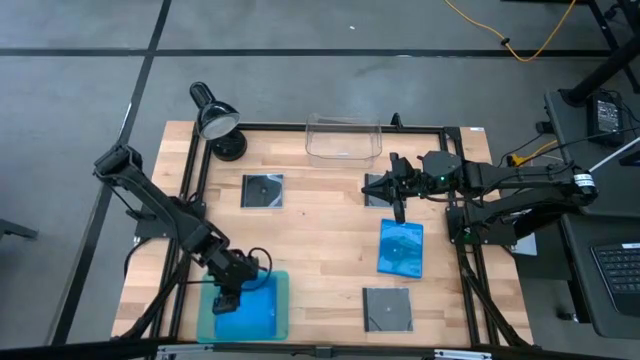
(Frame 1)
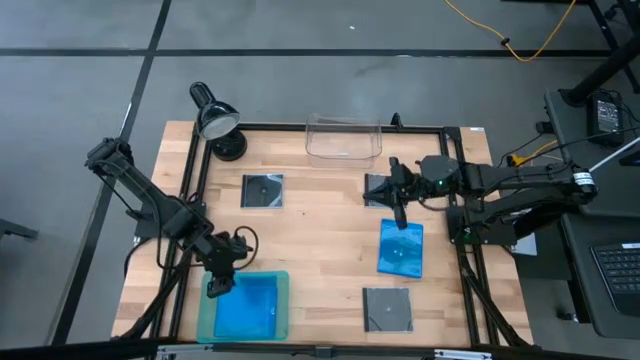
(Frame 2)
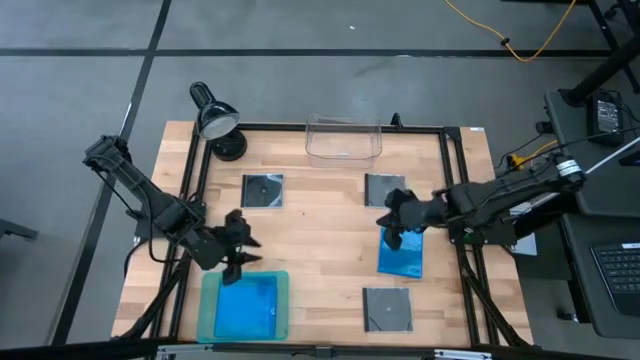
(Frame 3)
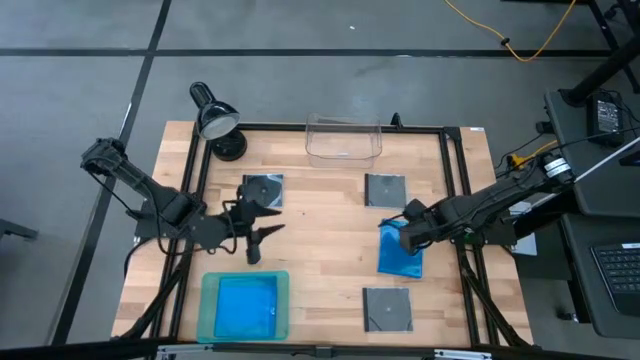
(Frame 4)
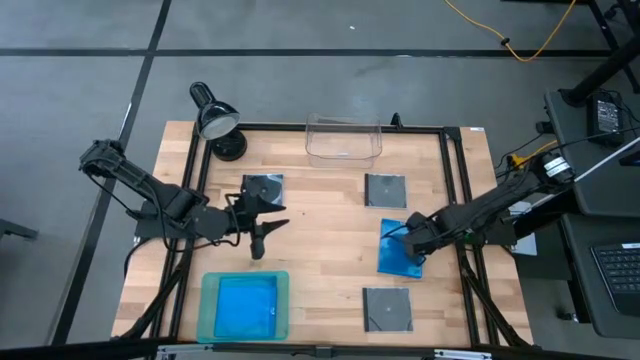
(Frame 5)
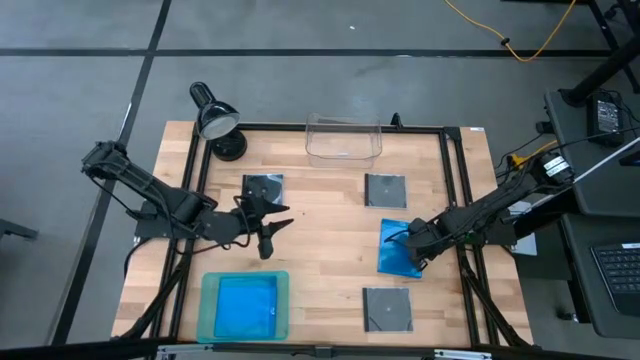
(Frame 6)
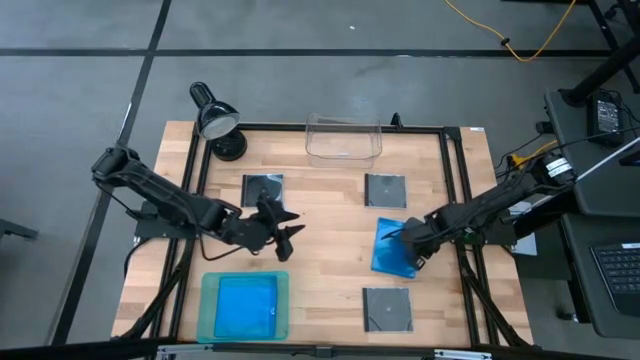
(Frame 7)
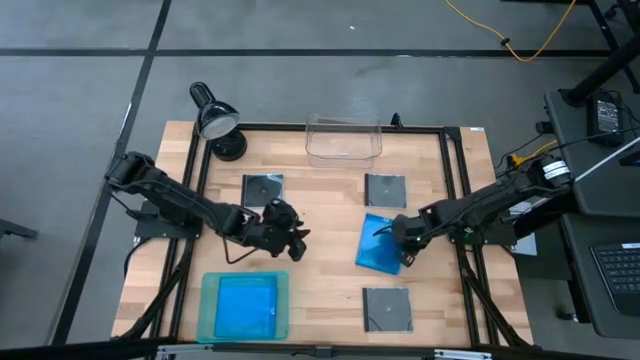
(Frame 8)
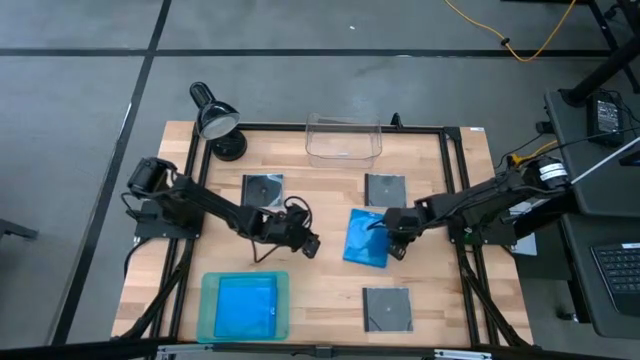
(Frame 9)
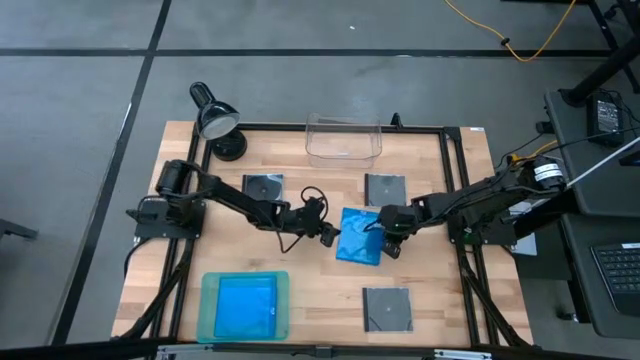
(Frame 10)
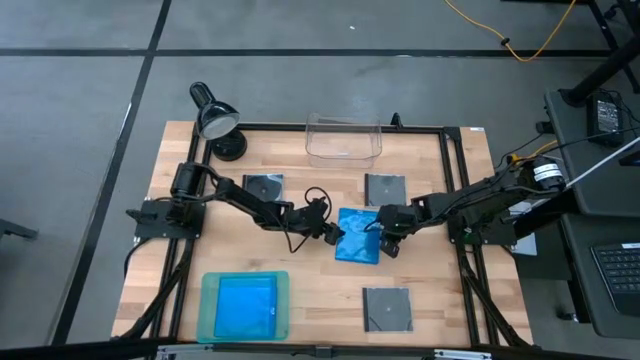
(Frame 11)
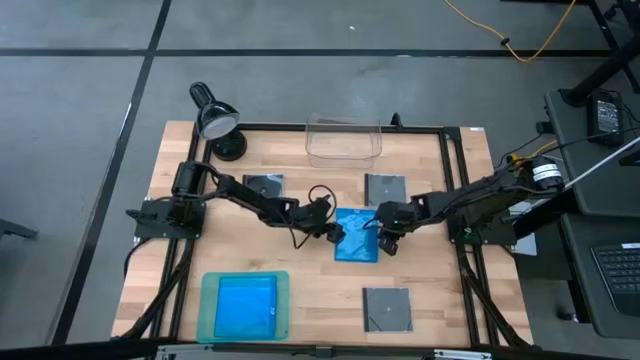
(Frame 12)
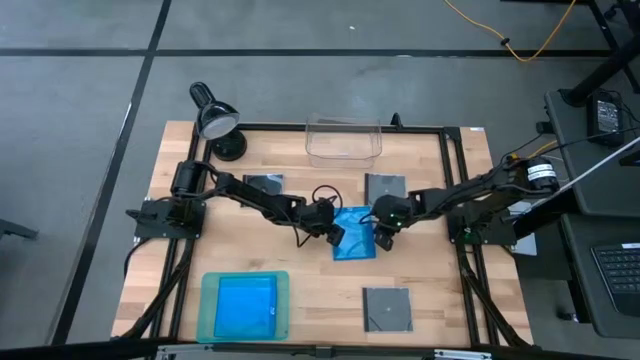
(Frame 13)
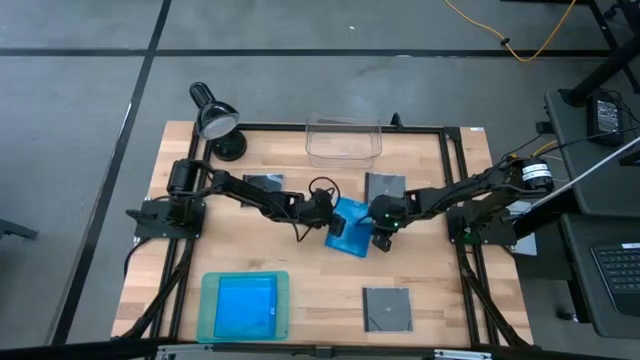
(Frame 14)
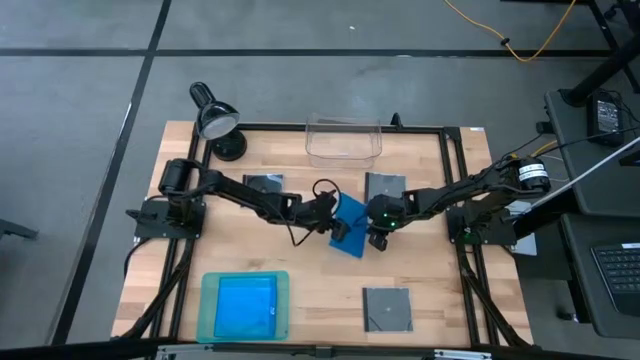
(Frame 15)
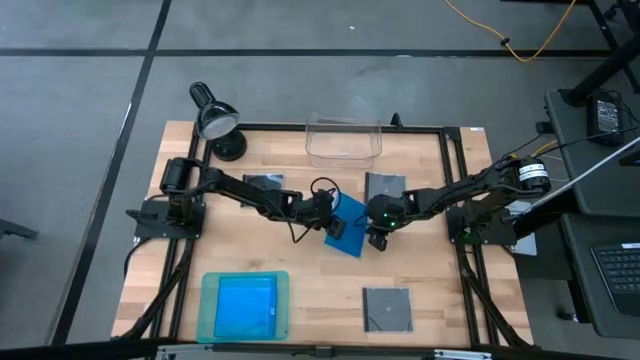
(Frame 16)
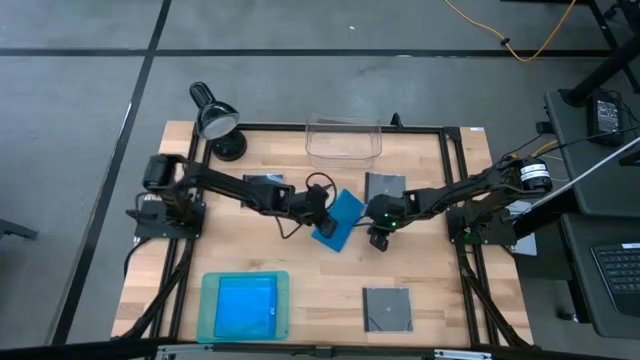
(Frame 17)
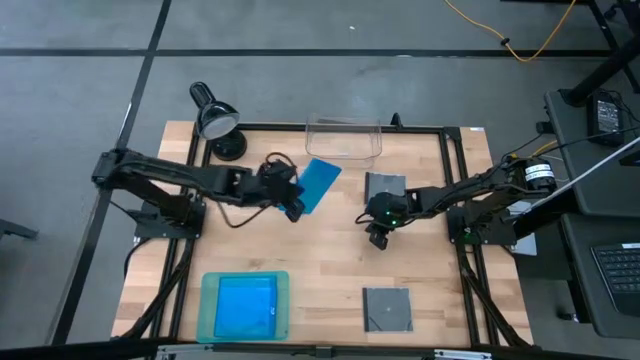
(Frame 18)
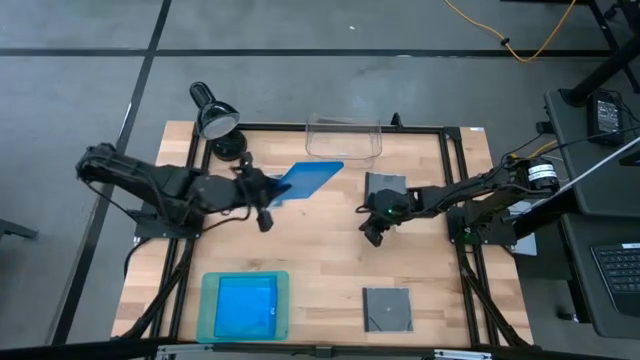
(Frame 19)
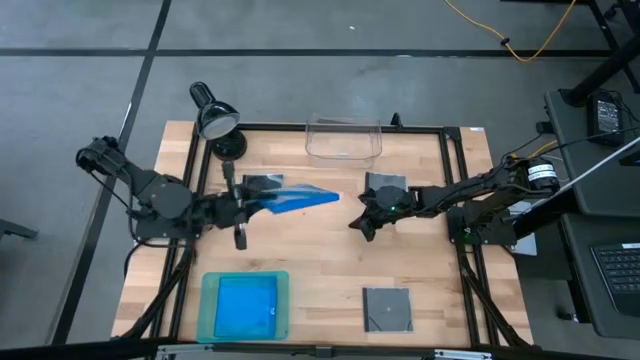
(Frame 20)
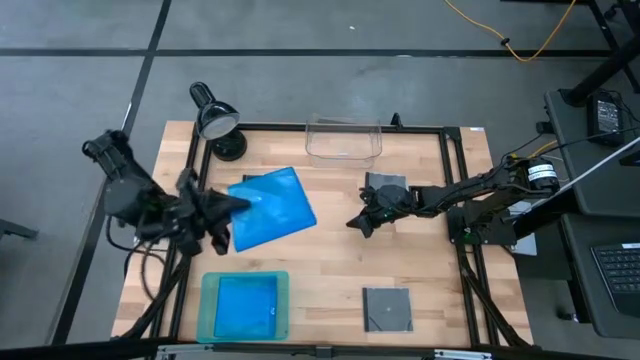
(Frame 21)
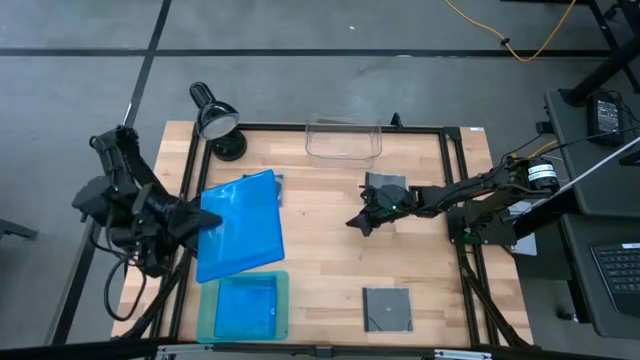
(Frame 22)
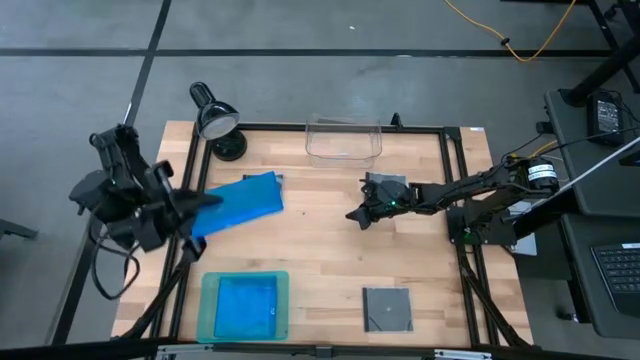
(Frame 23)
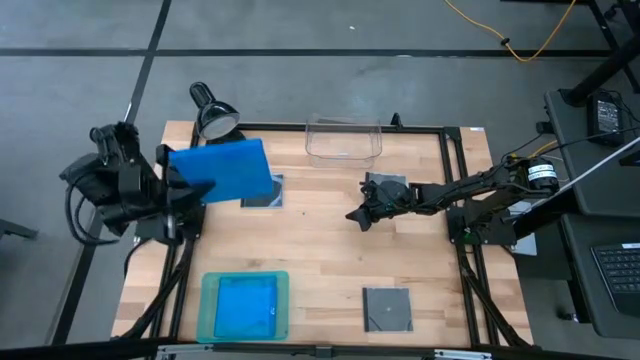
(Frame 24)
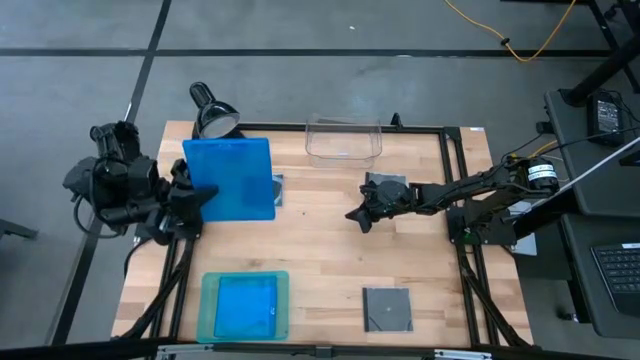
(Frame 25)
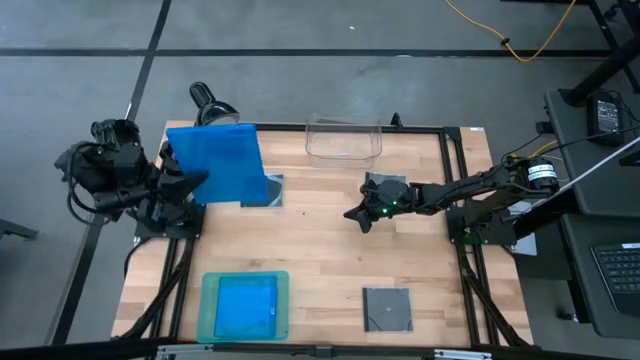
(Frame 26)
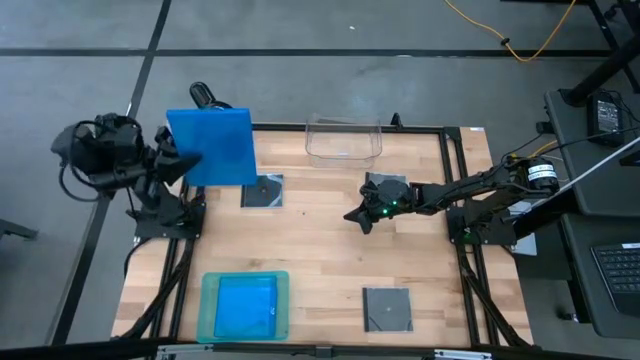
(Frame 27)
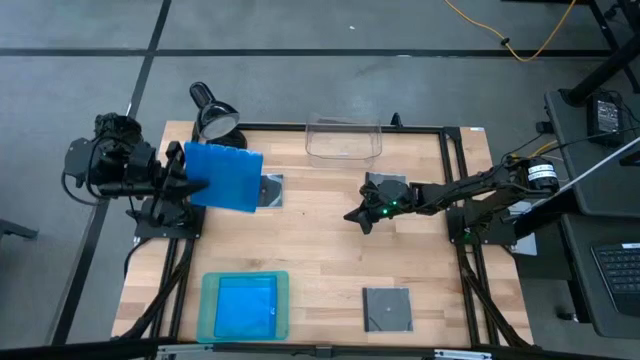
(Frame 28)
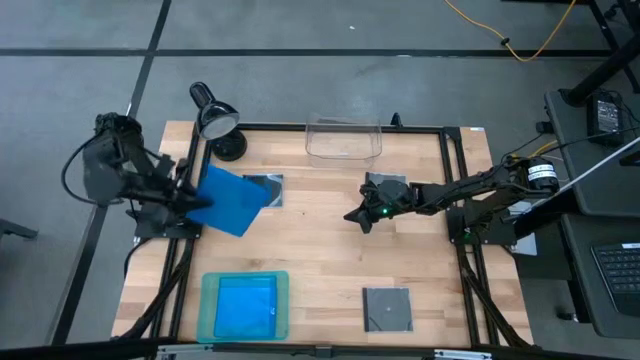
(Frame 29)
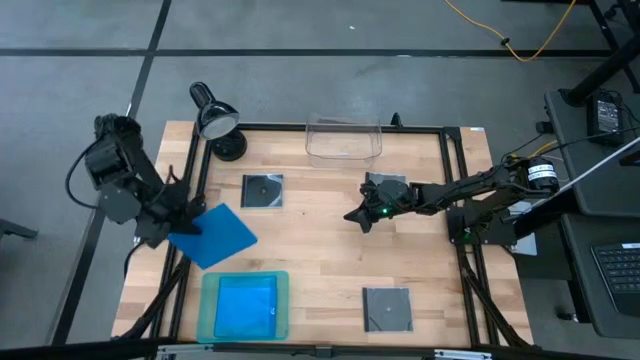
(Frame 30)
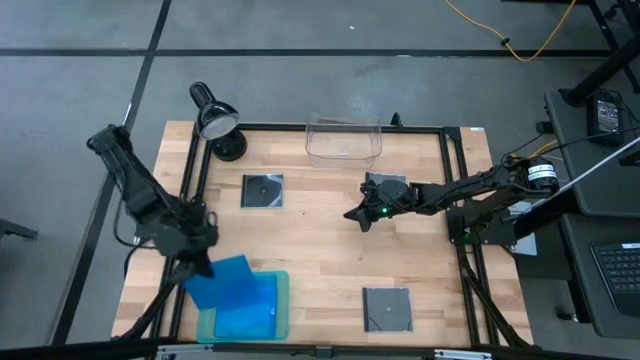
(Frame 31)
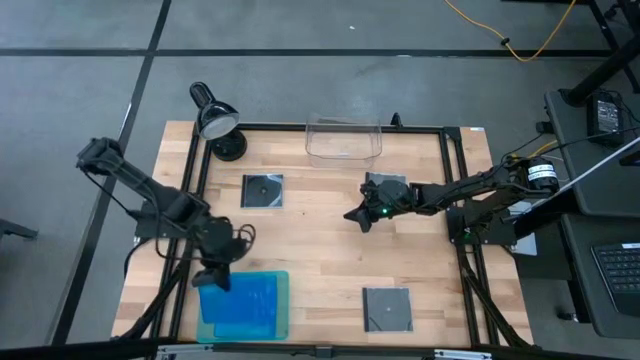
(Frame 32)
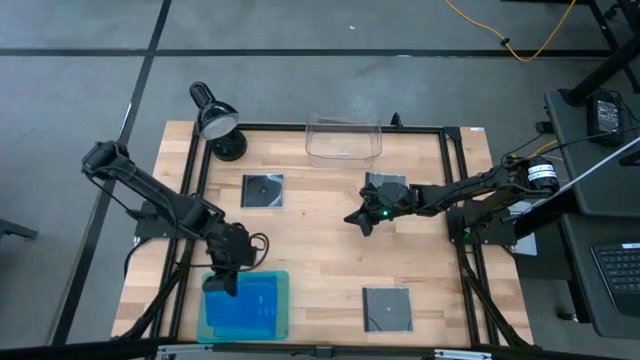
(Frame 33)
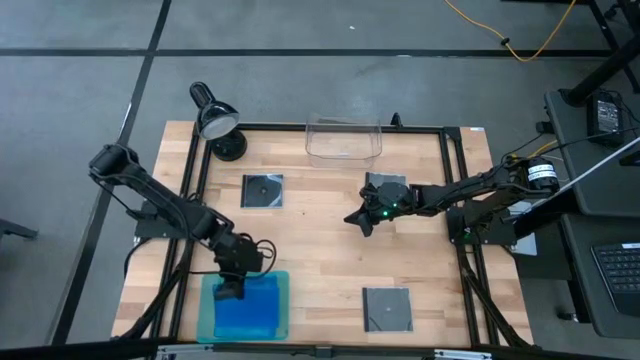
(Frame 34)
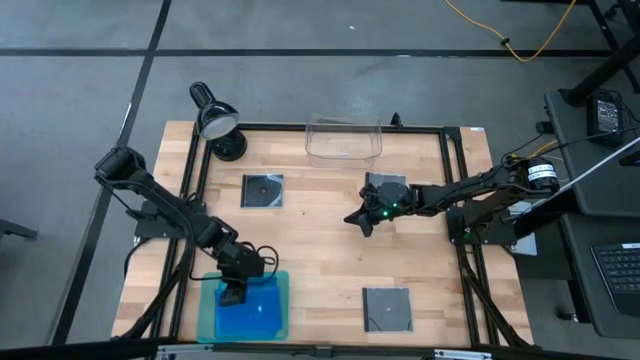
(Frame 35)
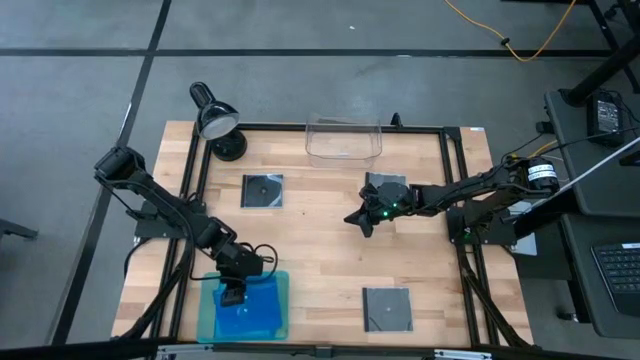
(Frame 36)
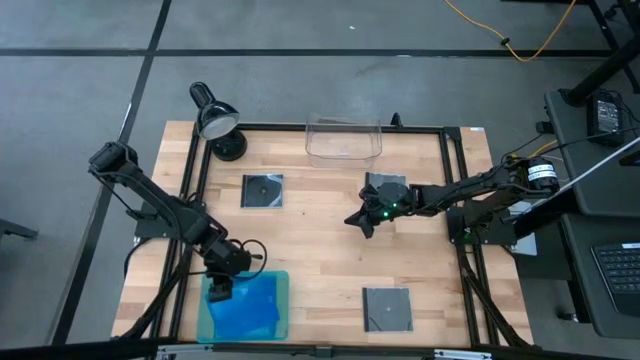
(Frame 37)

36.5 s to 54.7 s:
Task: Pick & place jewel cases by type
Put the blue CD case into the blue bin

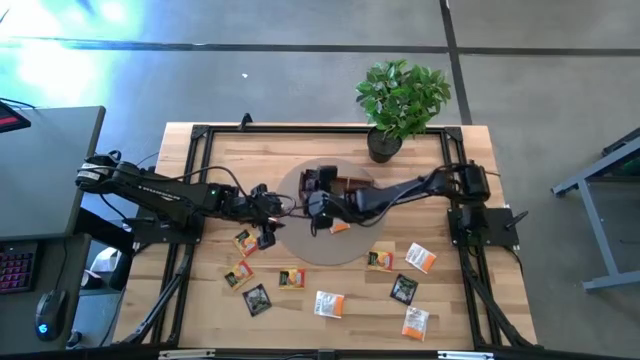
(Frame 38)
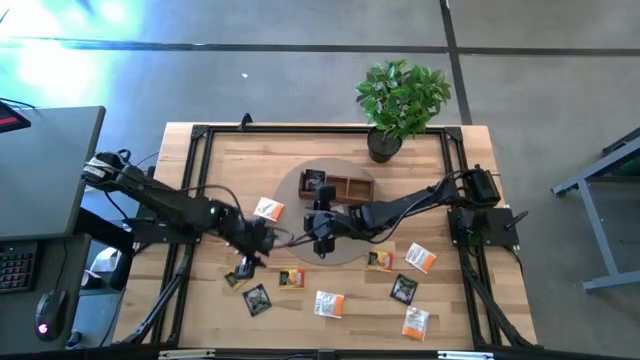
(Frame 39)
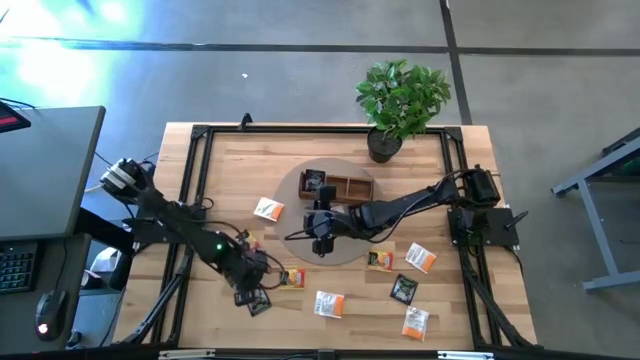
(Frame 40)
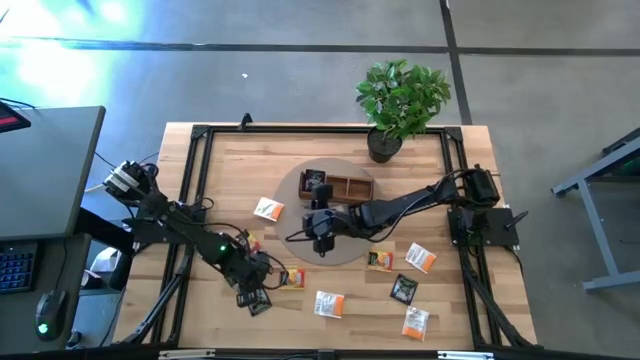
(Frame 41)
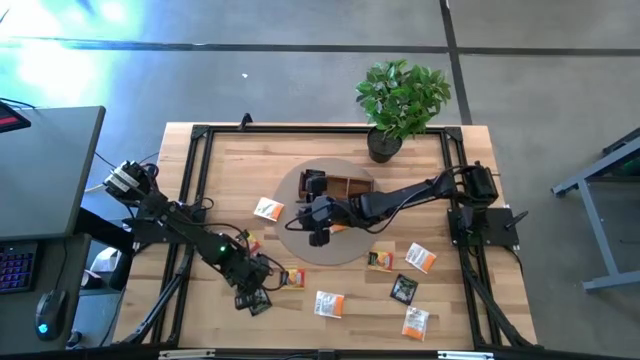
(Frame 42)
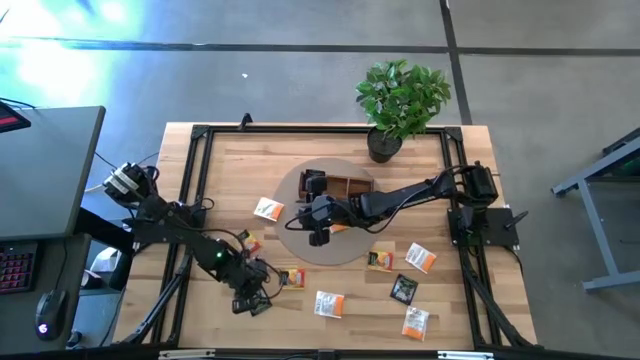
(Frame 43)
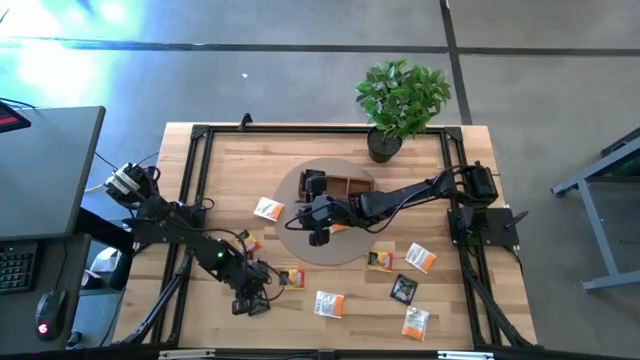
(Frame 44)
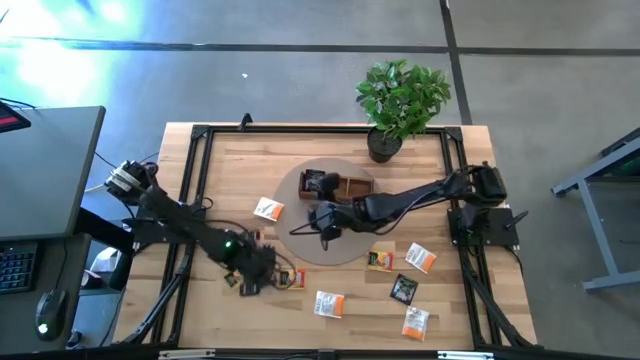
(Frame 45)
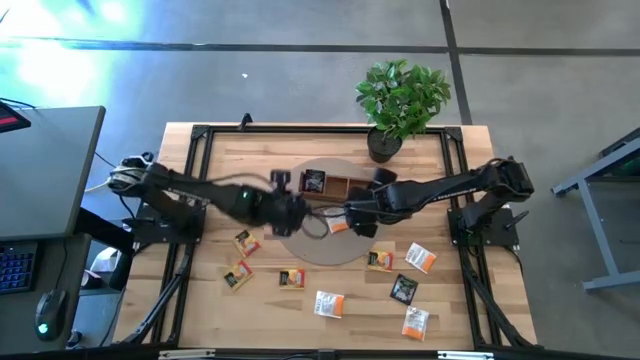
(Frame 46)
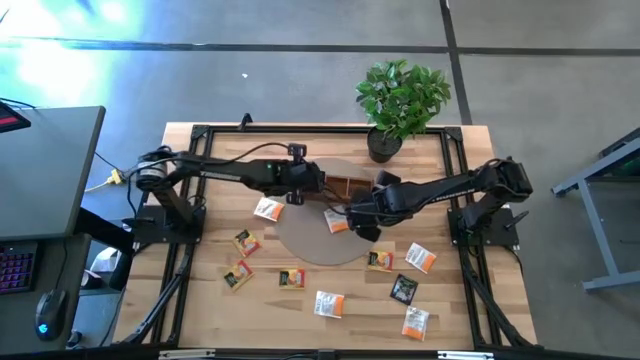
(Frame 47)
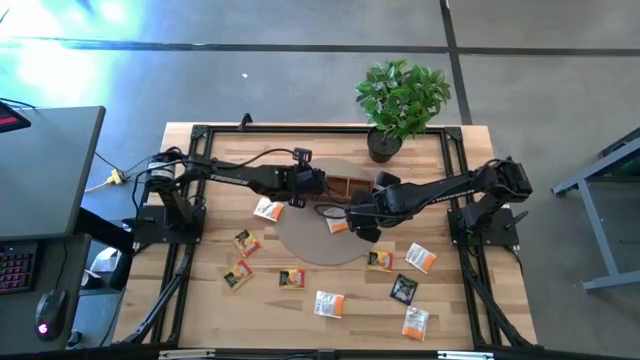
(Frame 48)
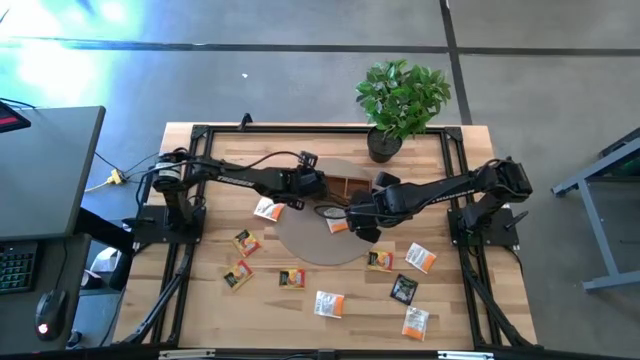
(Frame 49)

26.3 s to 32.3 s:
Task: Pick & Place Tea
Put the black tea bag into the left side area of the wooden organizer
